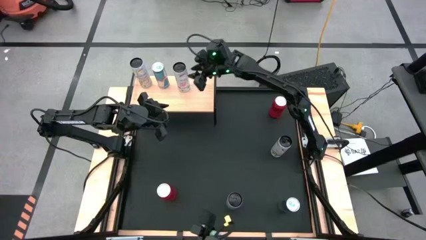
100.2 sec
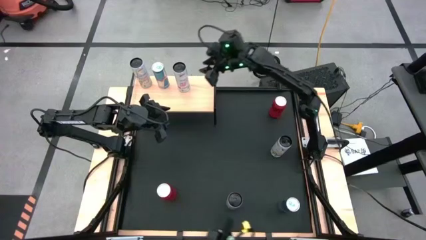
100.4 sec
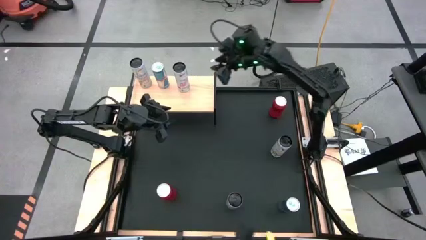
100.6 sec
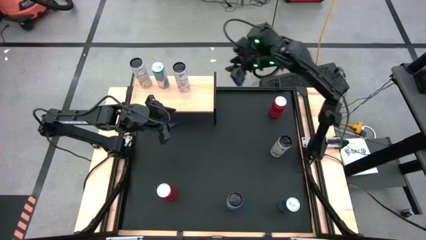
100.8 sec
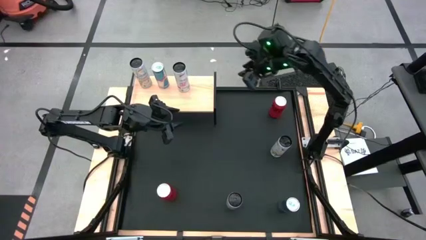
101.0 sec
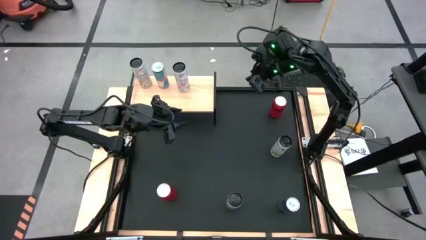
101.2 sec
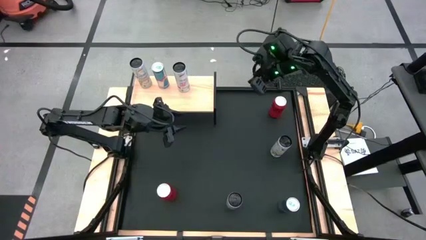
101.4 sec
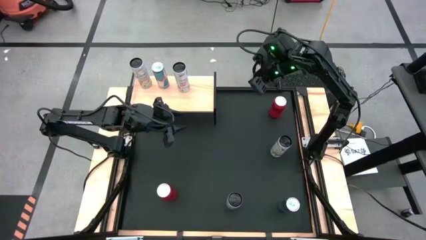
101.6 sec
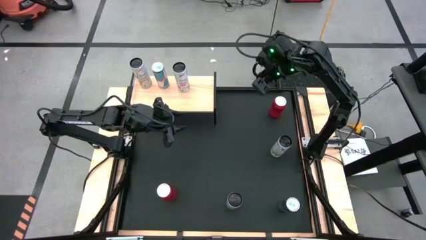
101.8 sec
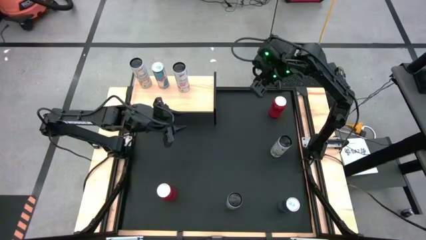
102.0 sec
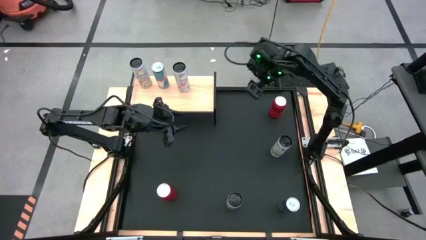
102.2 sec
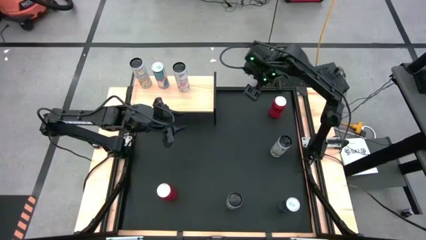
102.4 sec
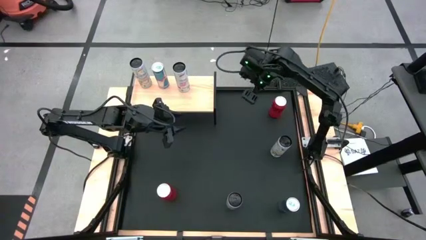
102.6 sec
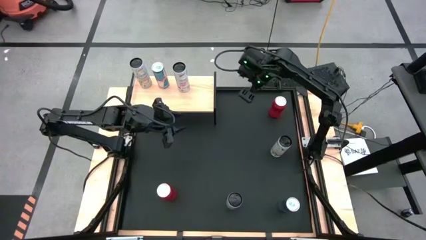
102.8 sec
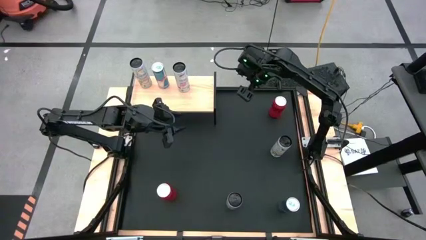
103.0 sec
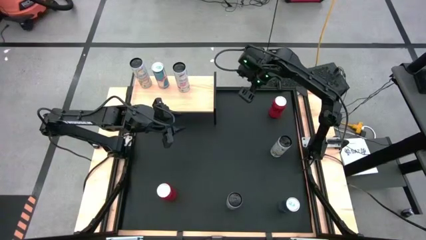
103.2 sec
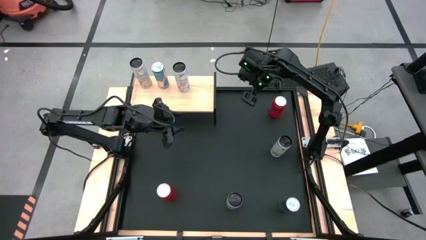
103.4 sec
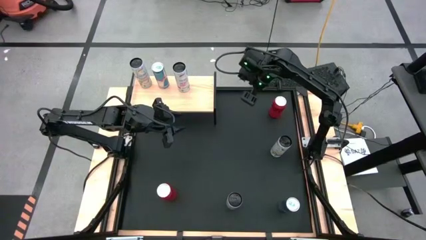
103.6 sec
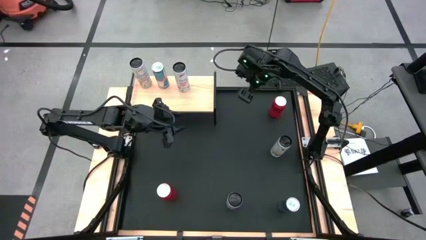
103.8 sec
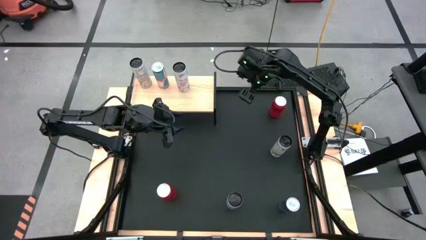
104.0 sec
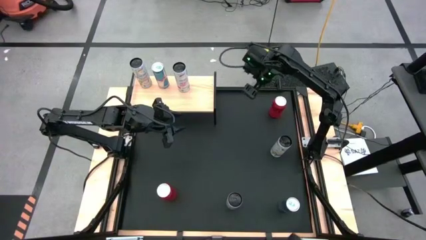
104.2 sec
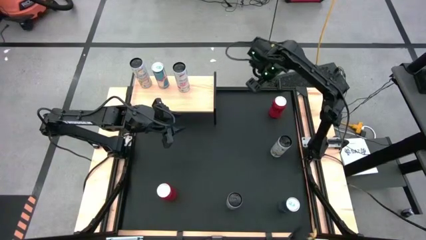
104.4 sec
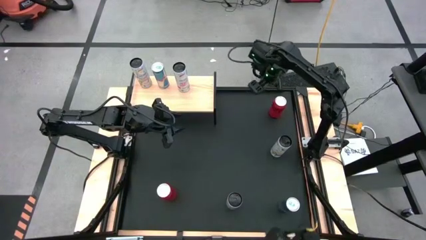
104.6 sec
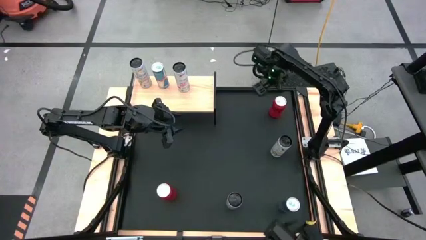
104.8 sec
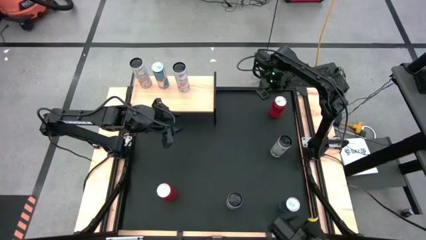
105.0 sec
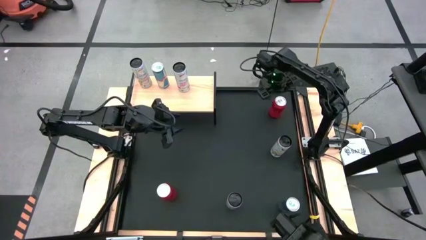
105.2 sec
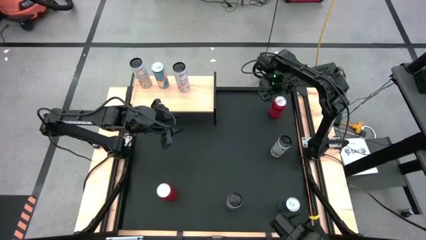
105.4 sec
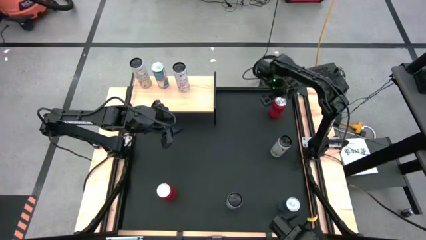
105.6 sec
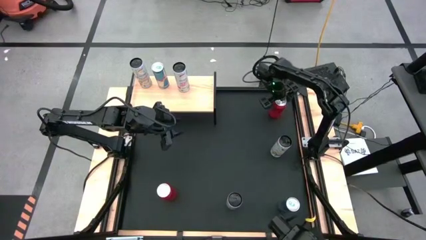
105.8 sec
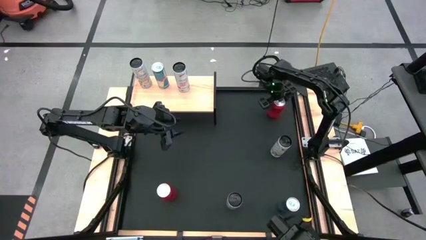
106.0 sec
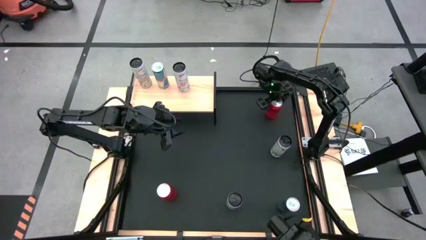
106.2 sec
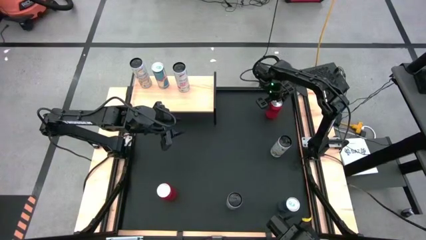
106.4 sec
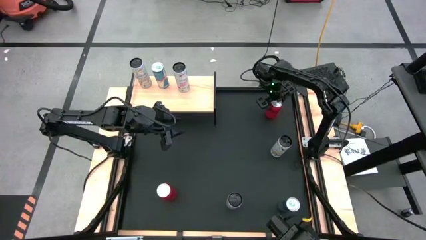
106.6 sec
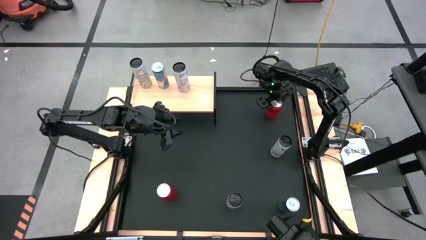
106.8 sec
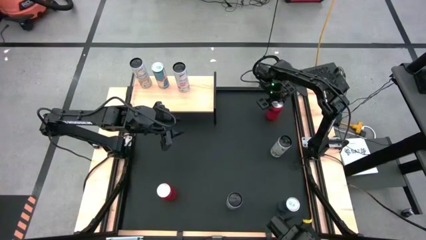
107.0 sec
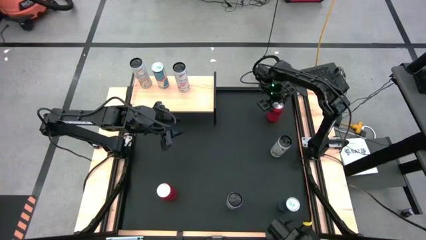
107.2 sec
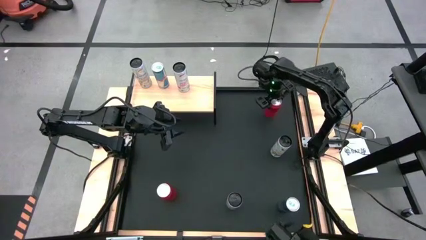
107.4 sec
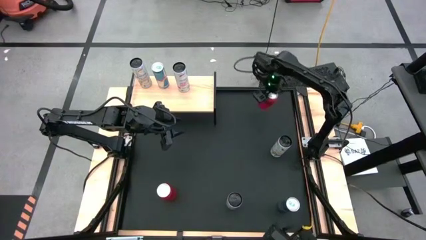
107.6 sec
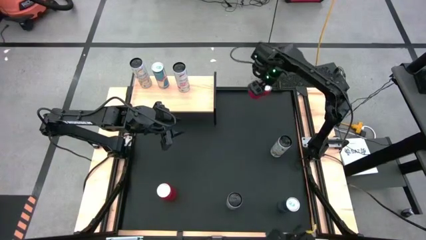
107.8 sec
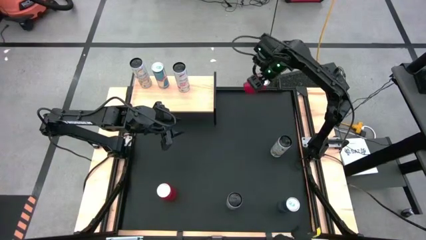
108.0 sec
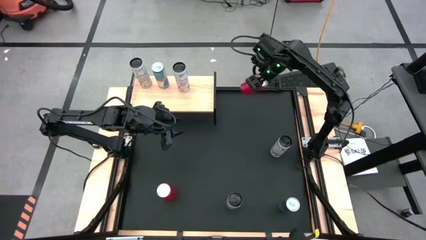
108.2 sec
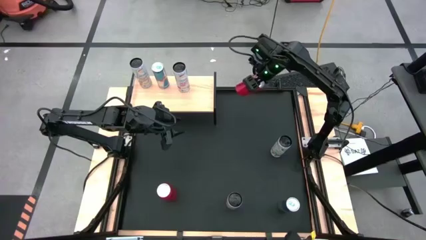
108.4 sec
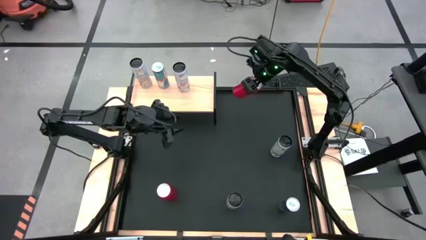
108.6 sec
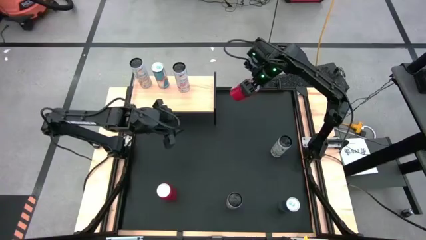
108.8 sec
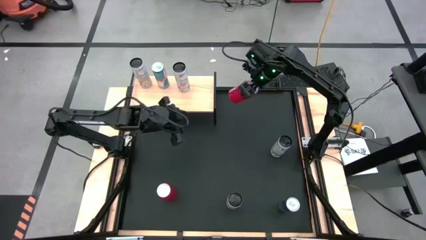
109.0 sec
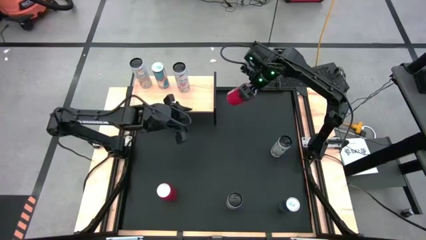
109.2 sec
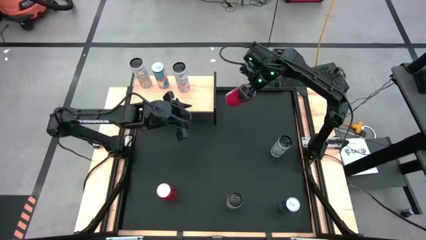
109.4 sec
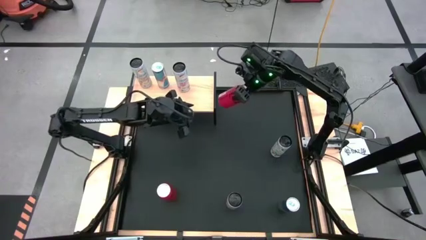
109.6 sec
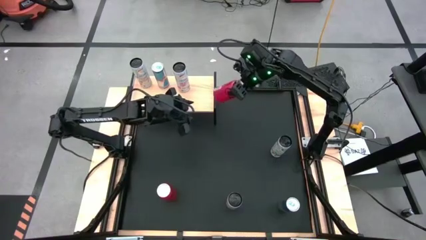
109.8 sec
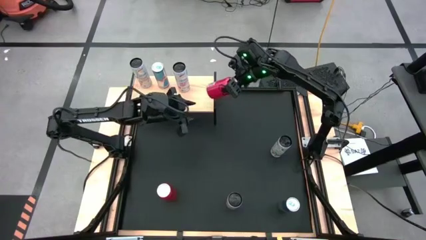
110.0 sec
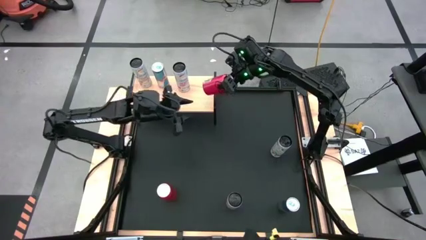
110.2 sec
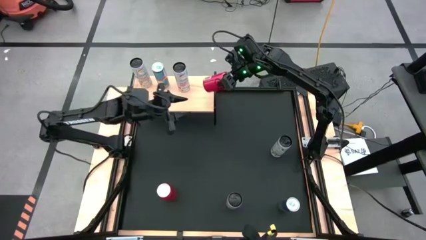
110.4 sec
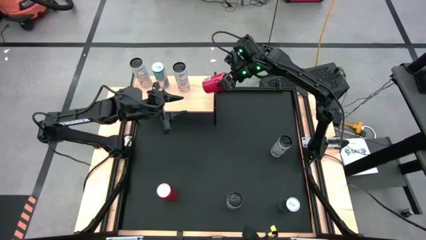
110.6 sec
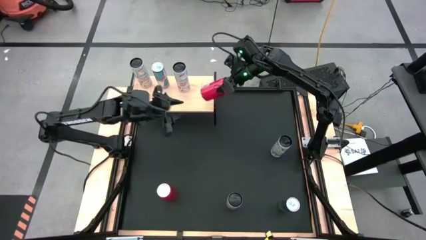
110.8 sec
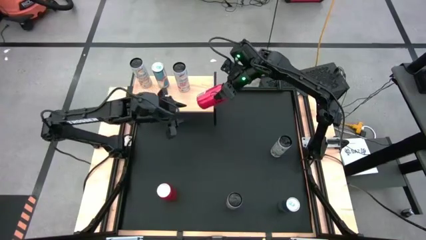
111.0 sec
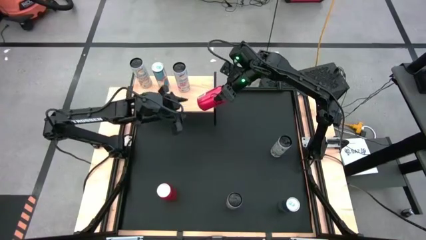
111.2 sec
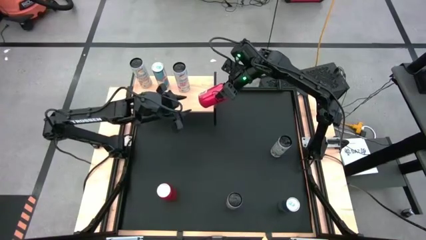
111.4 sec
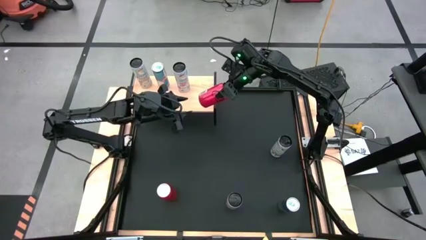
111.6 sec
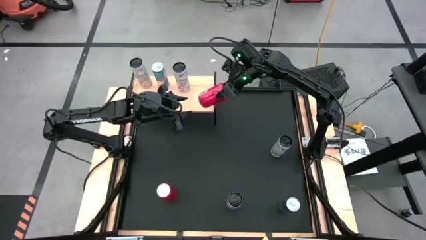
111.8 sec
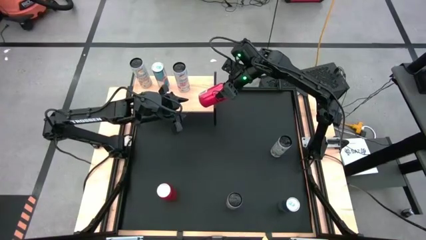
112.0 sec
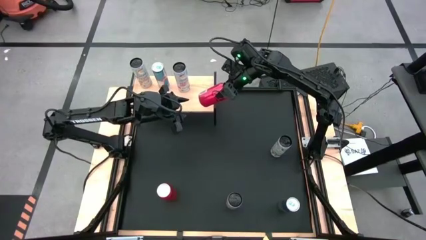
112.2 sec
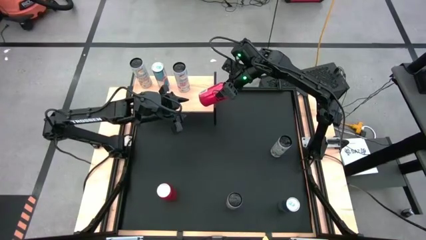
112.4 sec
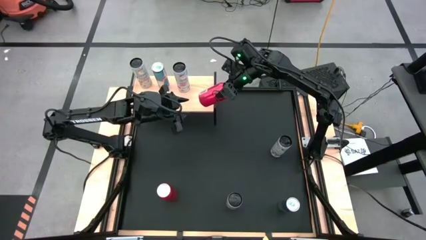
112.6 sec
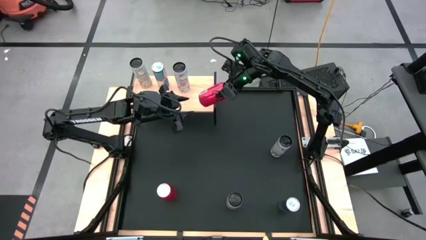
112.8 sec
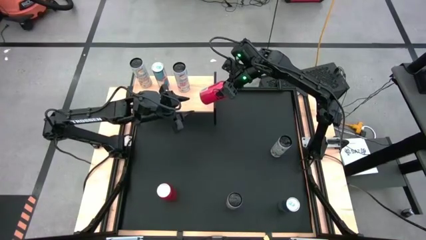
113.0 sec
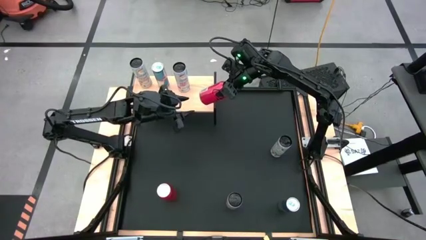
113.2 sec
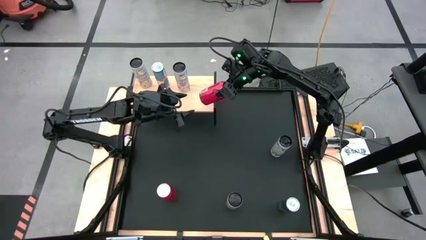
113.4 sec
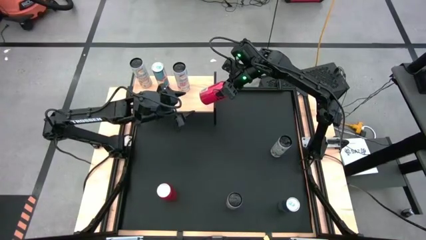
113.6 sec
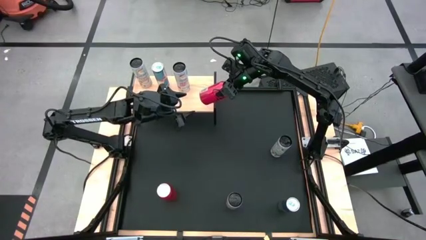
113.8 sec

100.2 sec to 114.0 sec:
Task: Place canned beverage on shelf
Put the top red black soda can on the shelf

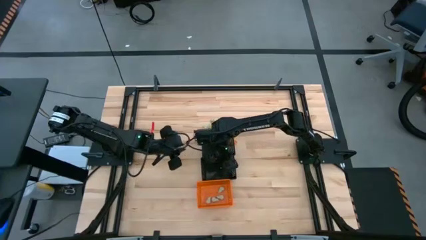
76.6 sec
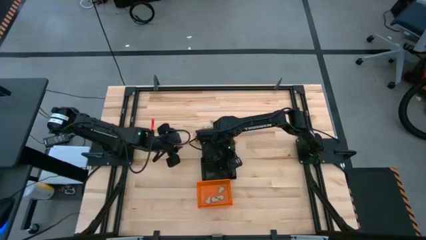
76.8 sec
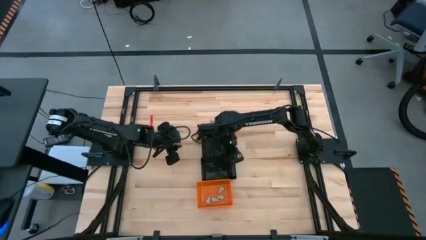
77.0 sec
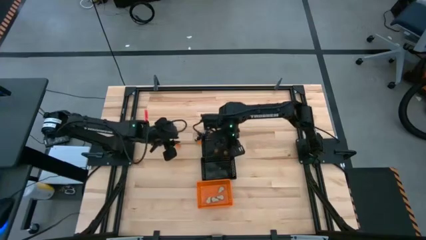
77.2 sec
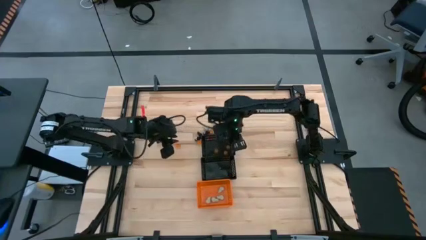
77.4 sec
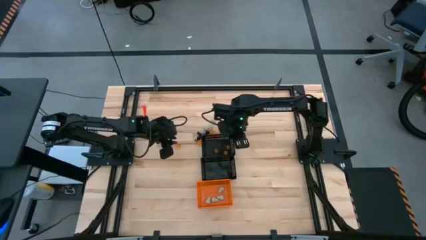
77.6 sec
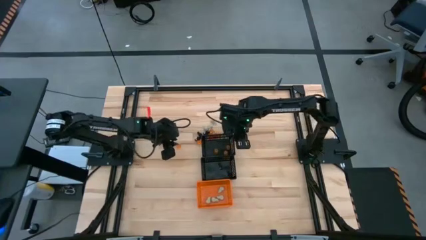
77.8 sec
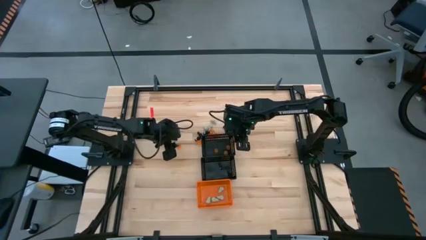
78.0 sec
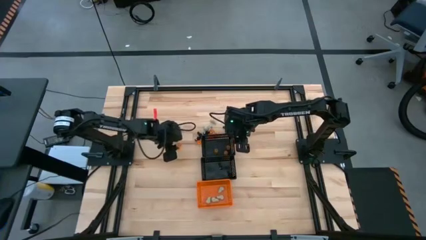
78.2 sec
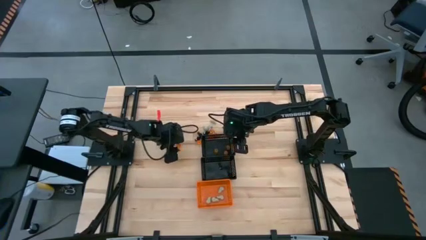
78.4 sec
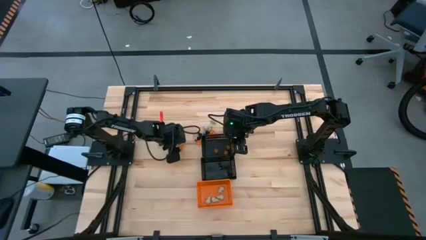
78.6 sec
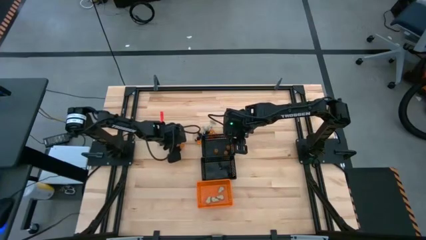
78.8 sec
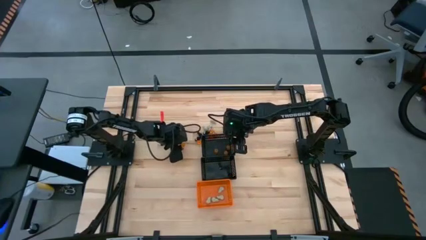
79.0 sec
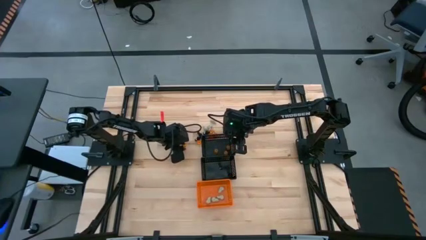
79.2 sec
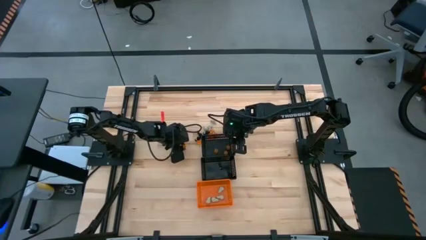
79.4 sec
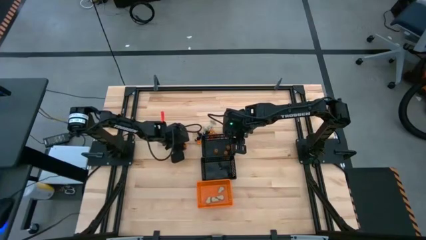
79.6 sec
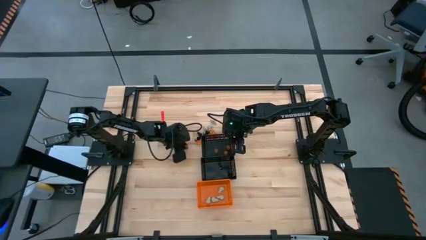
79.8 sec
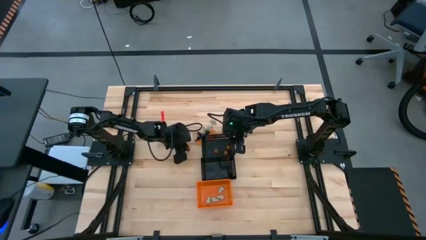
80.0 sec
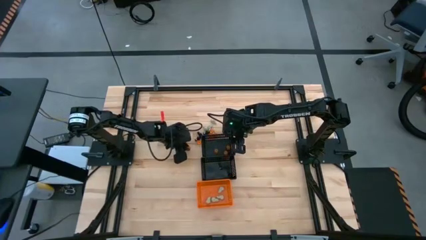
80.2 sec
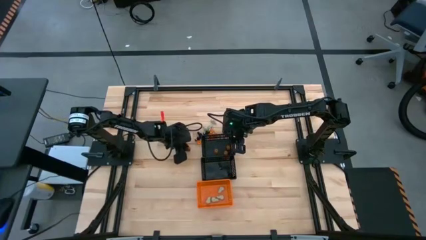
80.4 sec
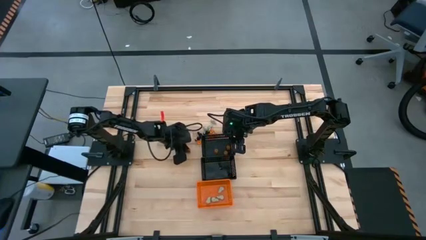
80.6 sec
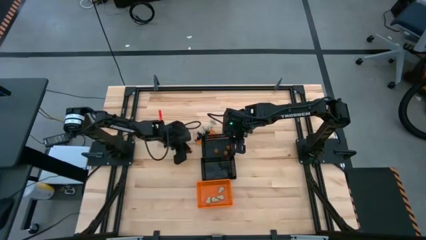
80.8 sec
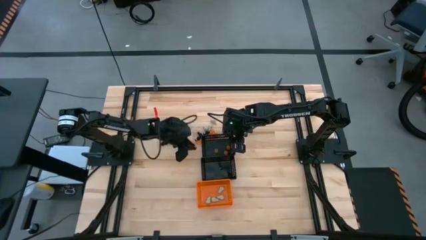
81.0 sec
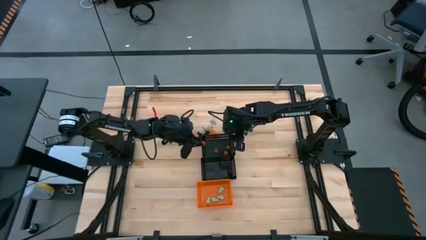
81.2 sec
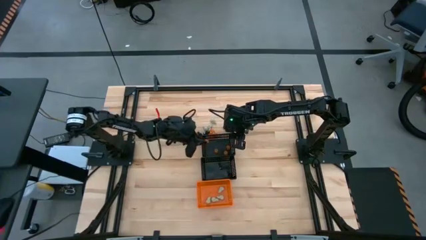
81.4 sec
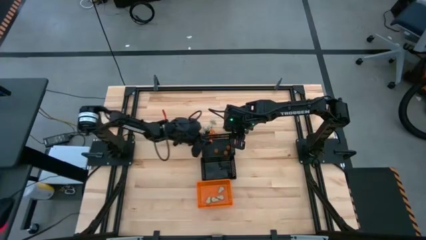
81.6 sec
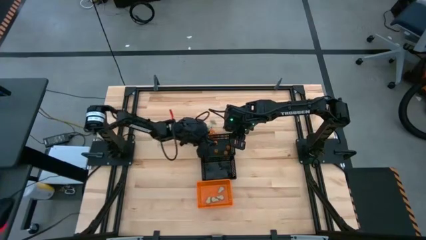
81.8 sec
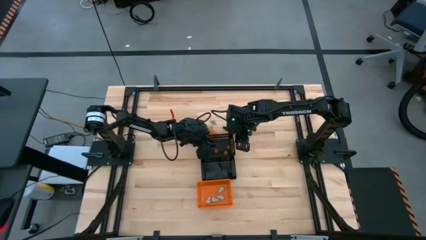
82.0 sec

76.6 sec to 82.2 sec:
Task: Sort Halloween decoration
Put the orange pumpkin toy into the top black bin
